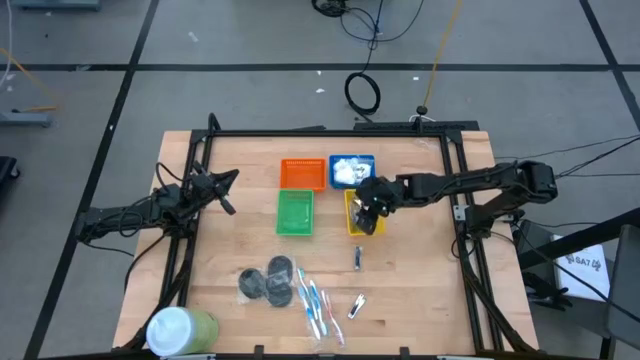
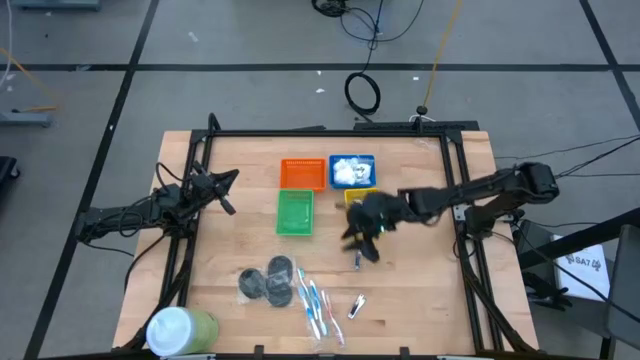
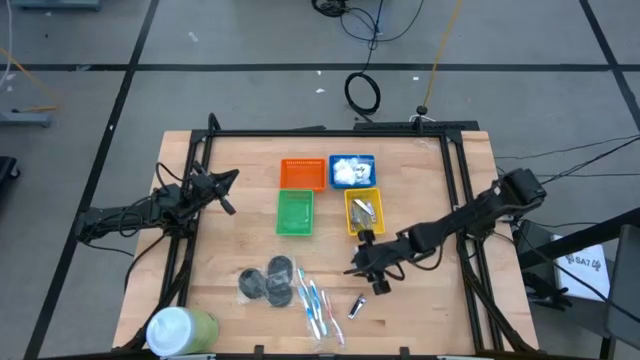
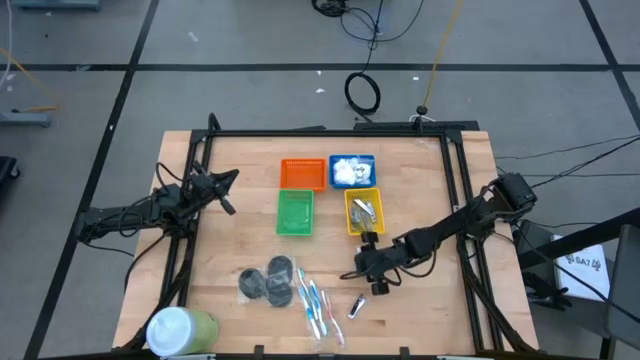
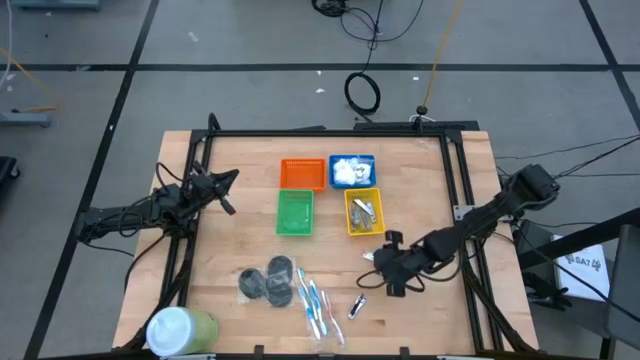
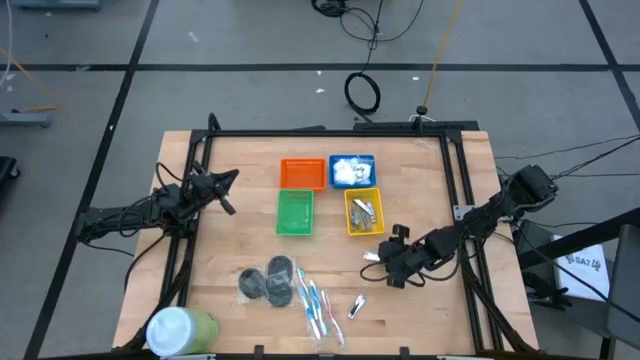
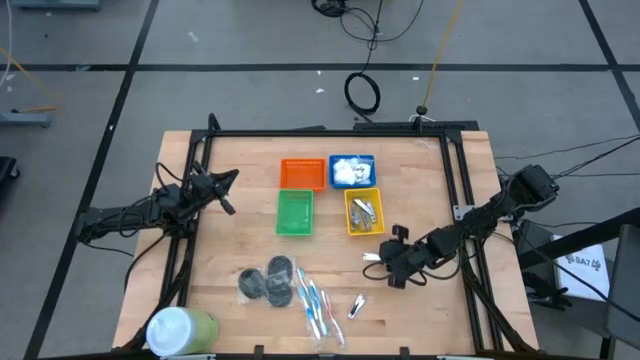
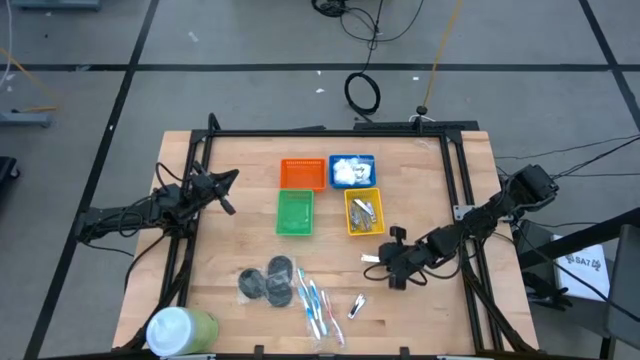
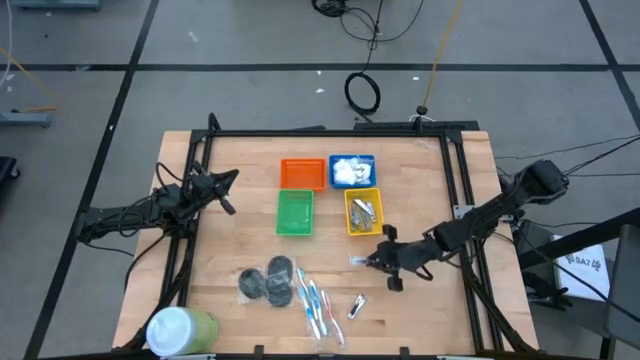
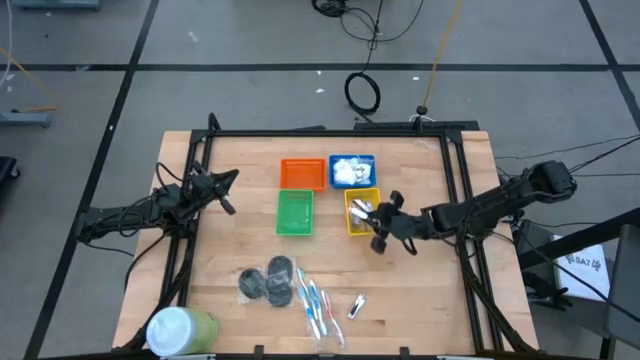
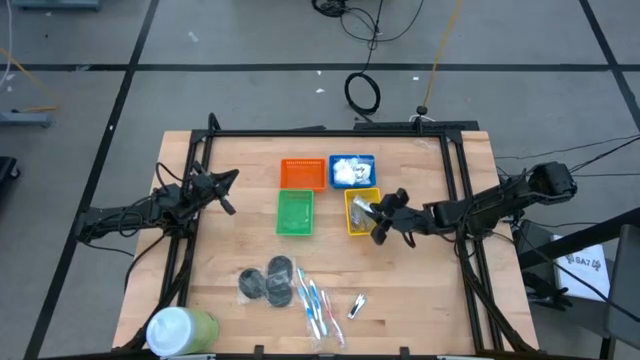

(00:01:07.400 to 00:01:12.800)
Task: Pick & Place Travel size toiletries
Put the silver nail cutter into the yellow bin

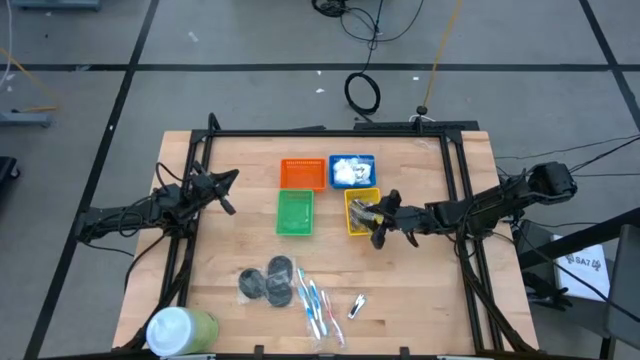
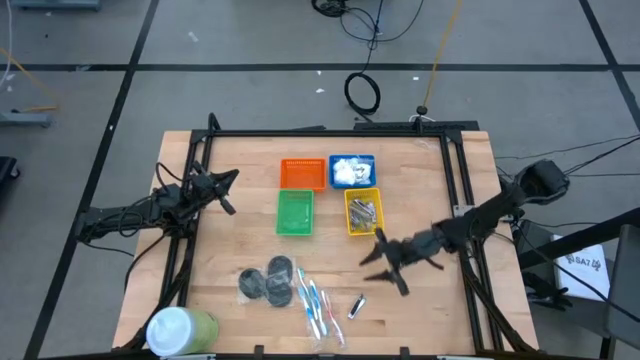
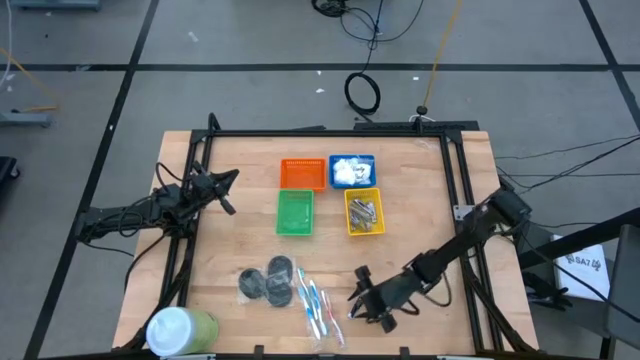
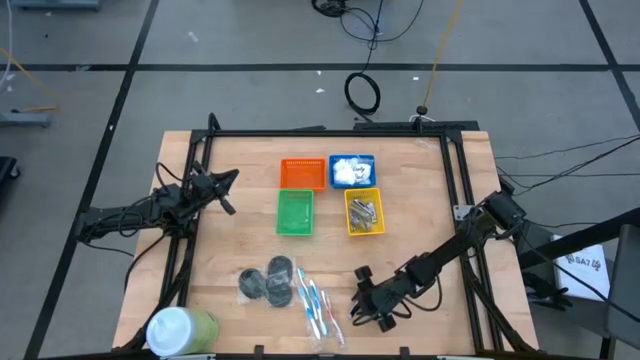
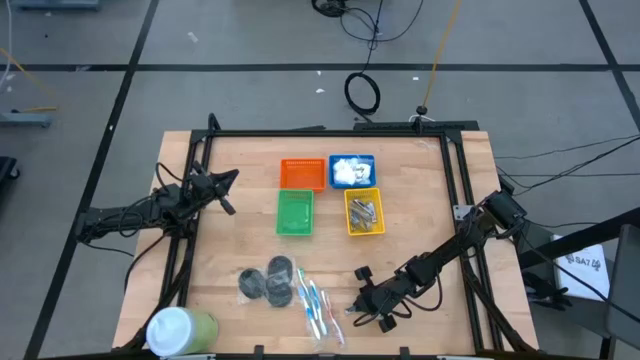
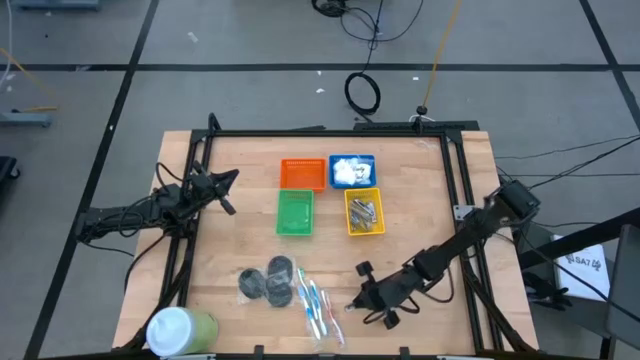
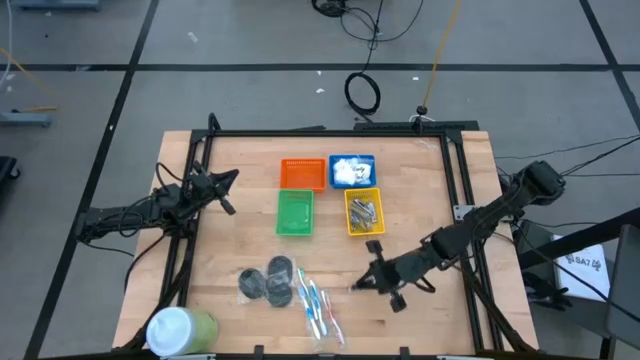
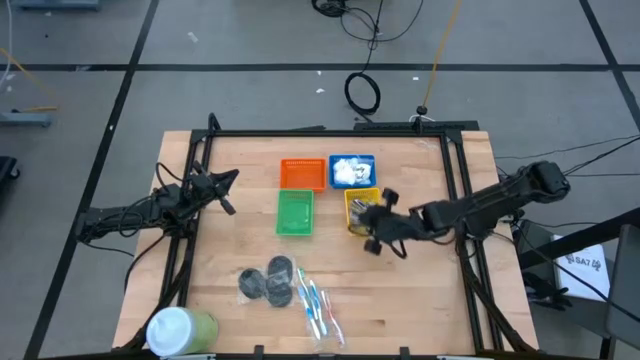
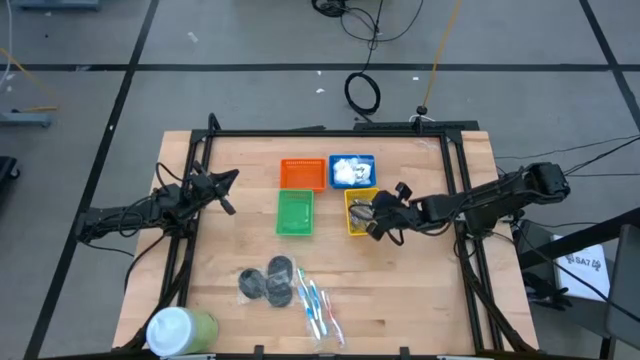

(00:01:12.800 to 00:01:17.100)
Put the silver nail cutter into the yellow bin

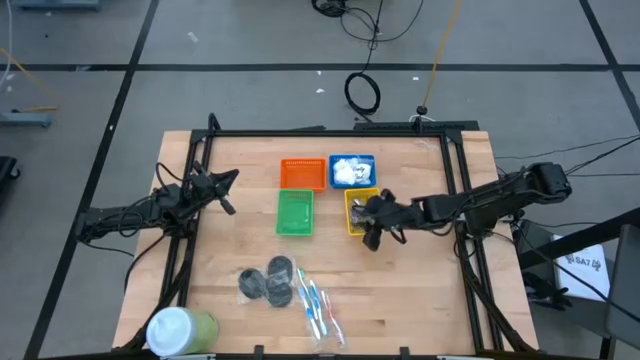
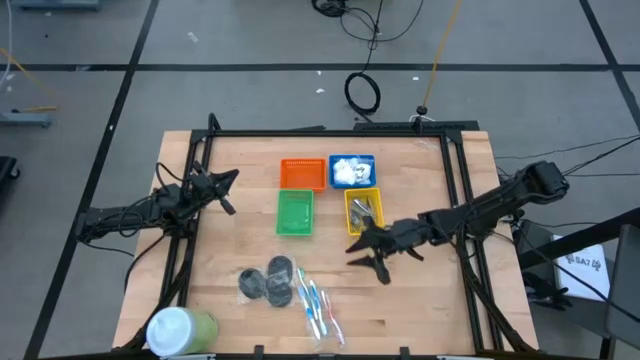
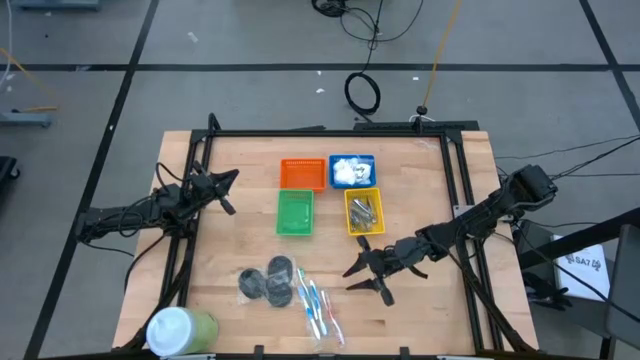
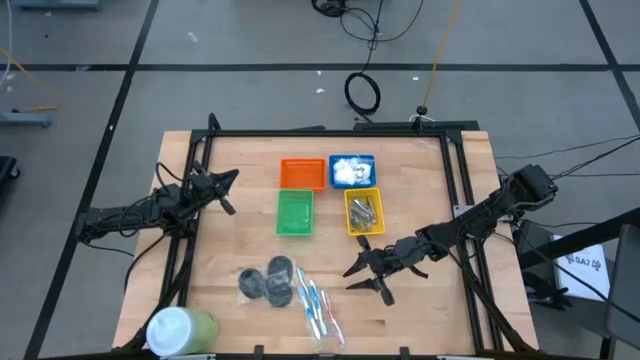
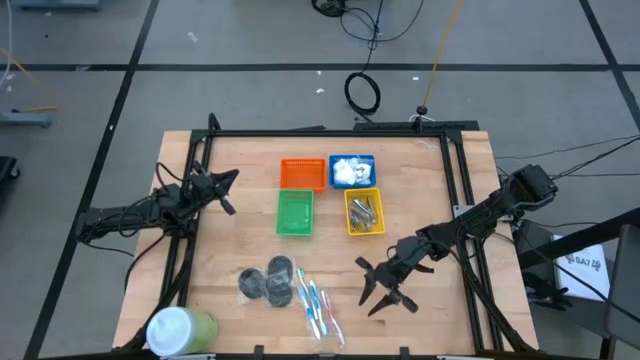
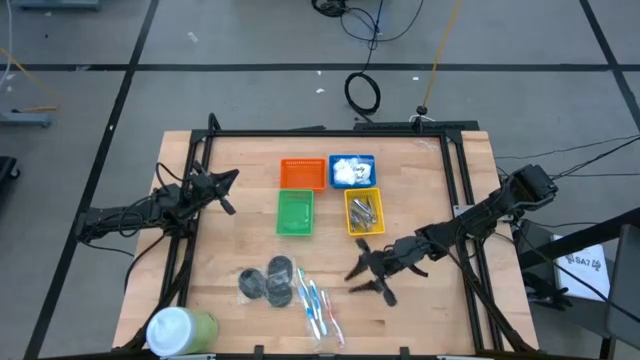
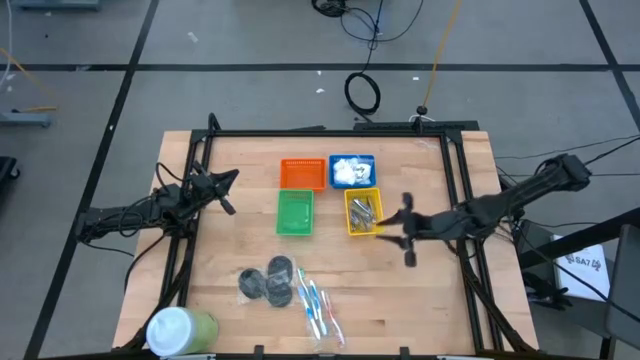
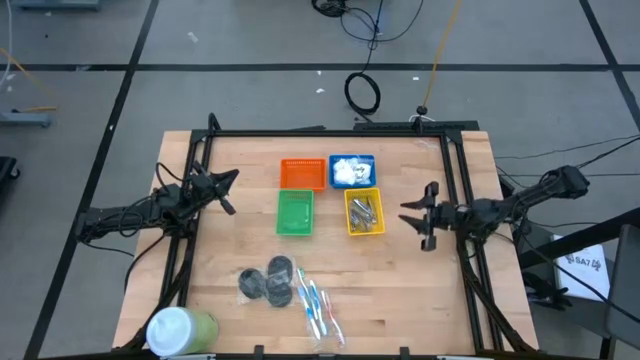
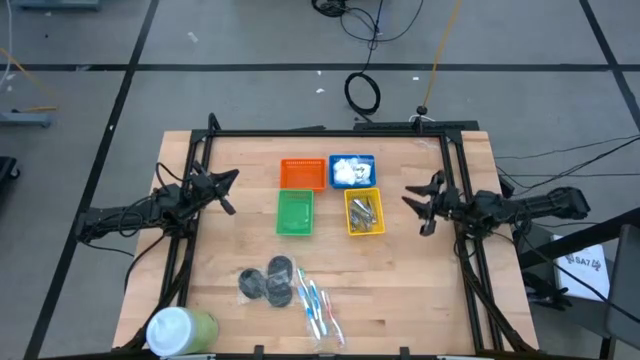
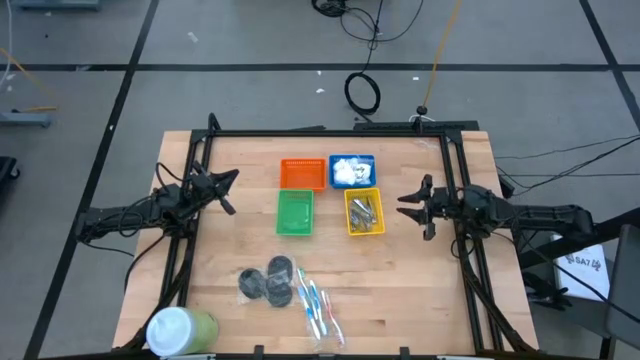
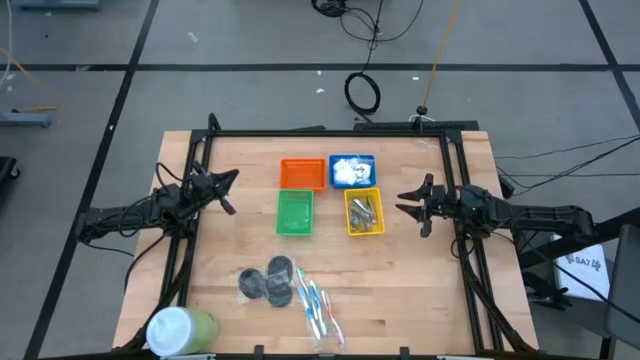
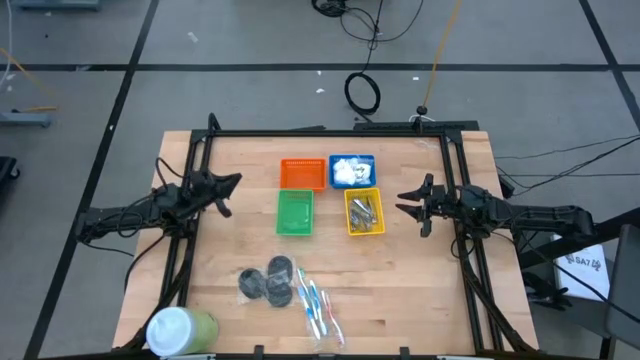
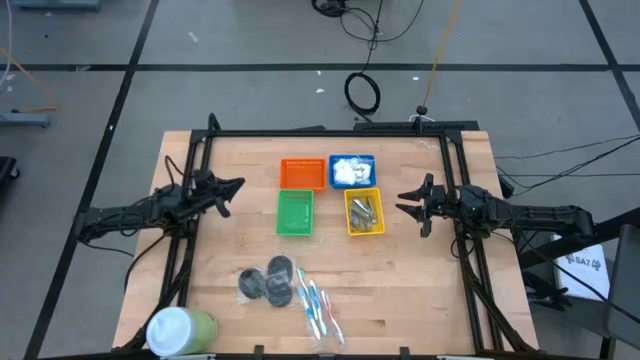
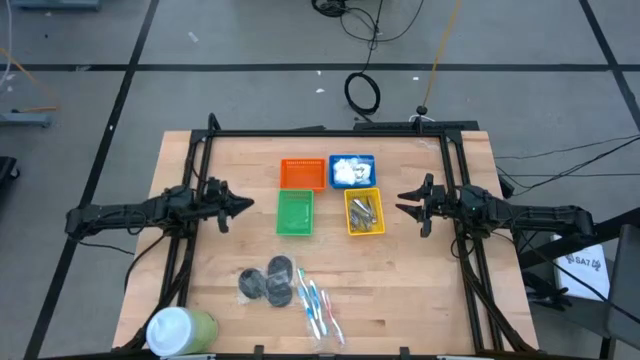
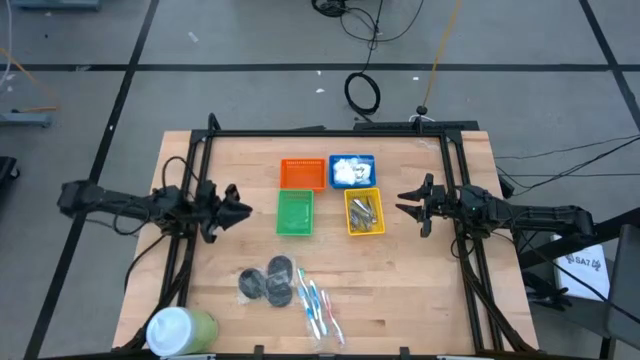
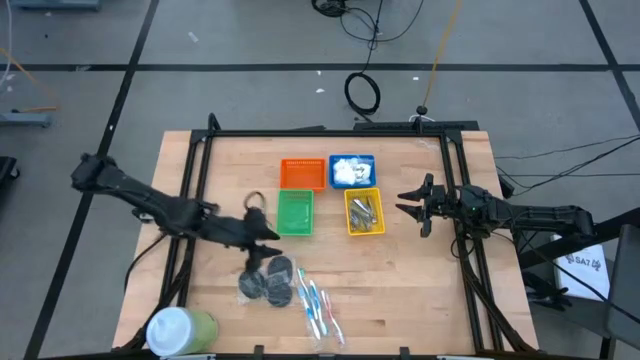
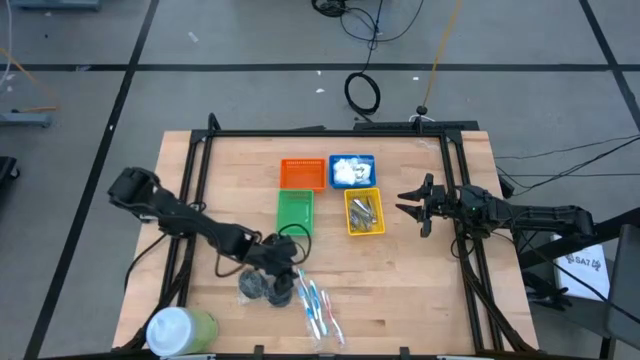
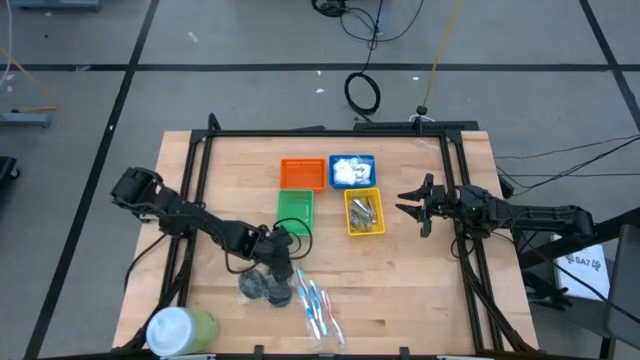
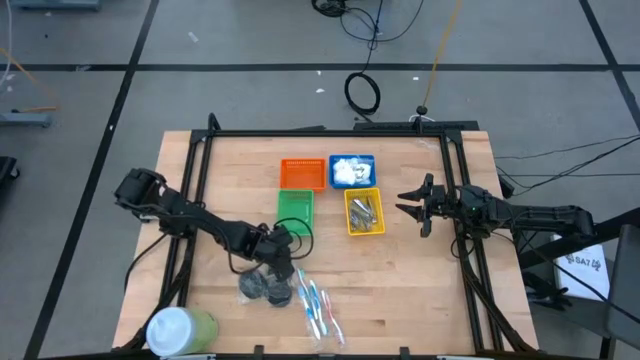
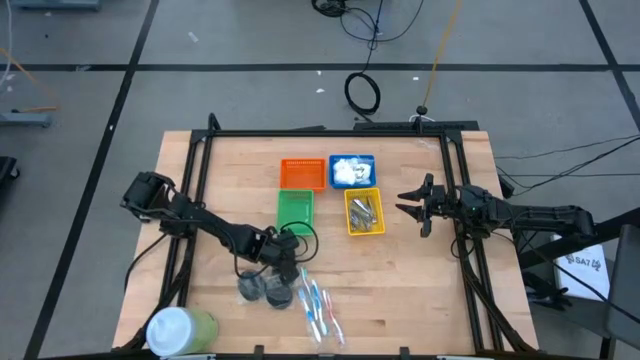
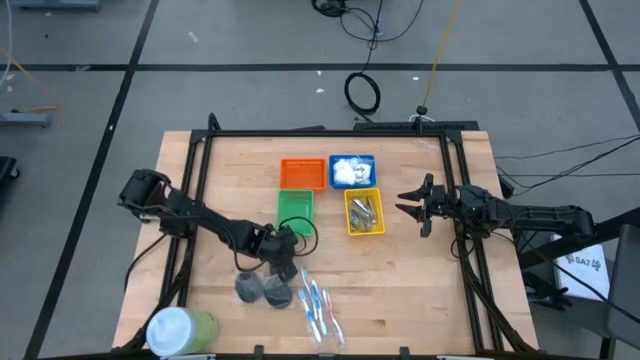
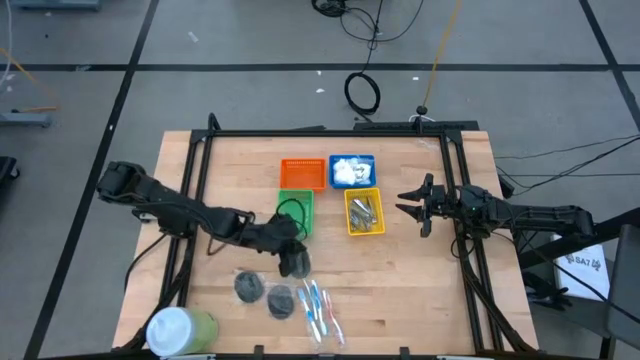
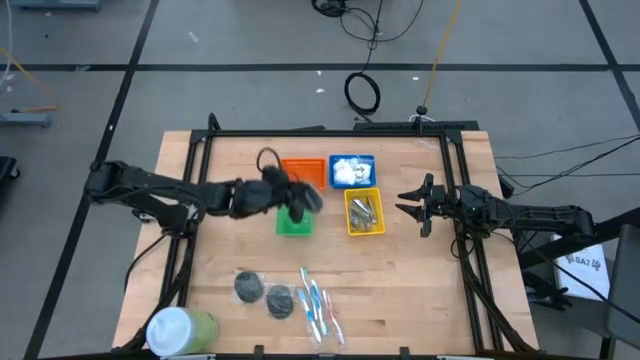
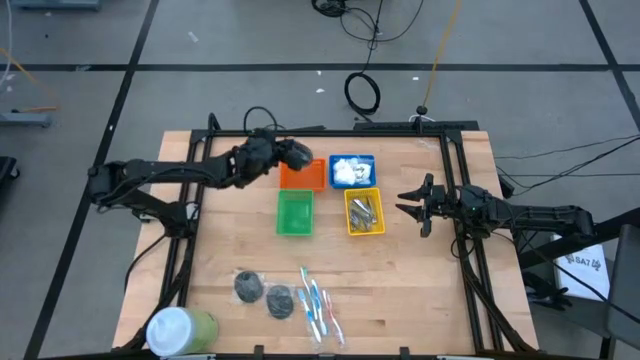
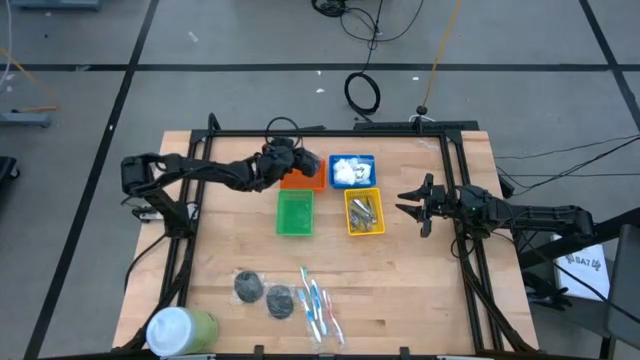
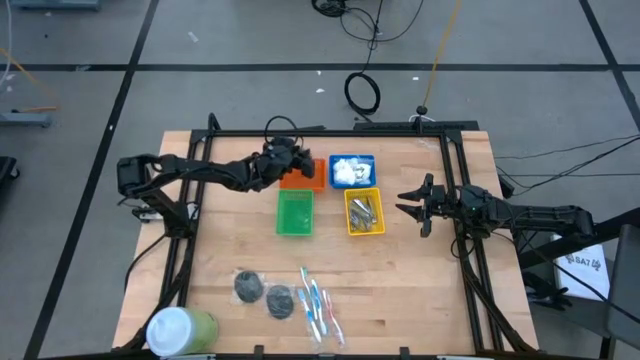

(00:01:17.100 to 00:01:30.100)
Put the black hairbrush into the orange bin
